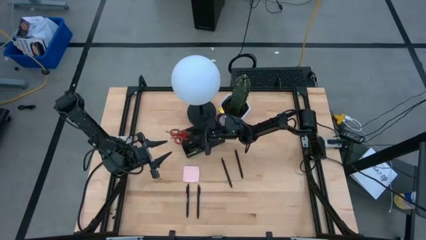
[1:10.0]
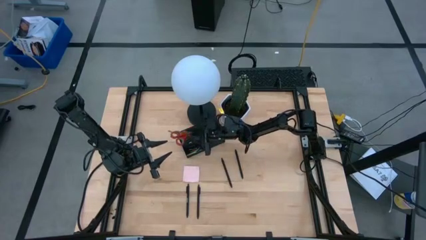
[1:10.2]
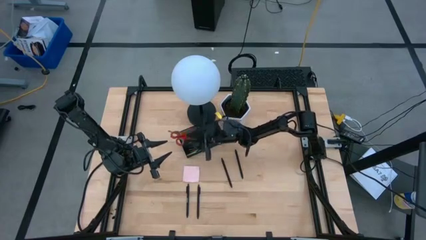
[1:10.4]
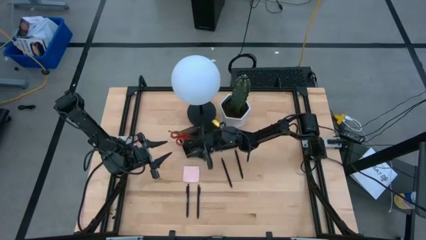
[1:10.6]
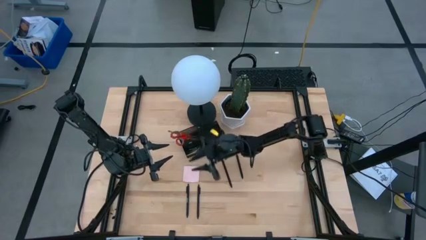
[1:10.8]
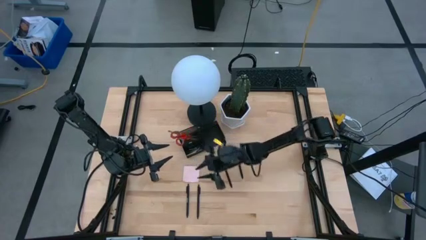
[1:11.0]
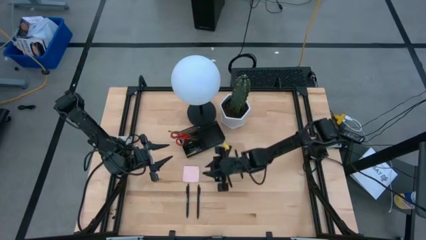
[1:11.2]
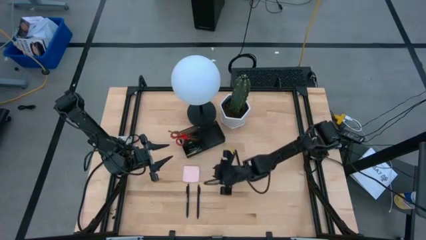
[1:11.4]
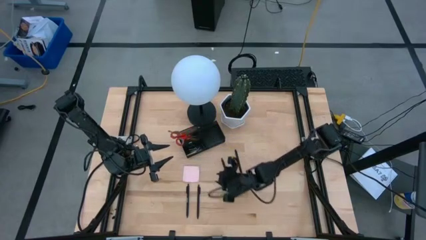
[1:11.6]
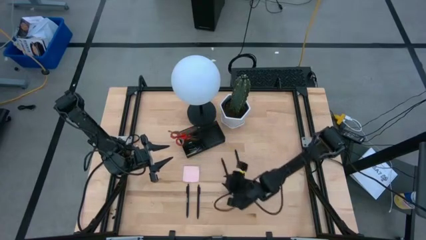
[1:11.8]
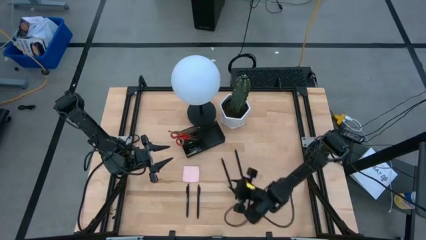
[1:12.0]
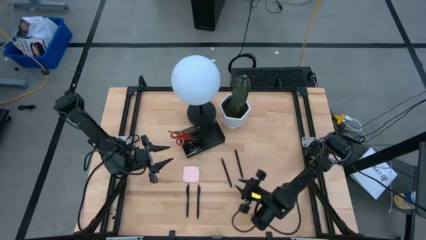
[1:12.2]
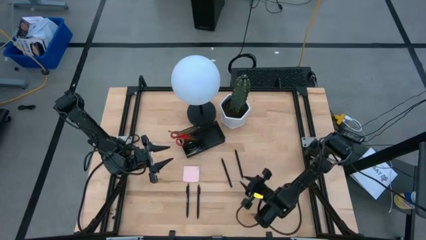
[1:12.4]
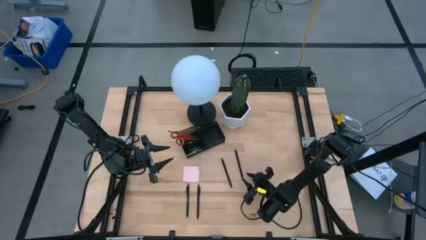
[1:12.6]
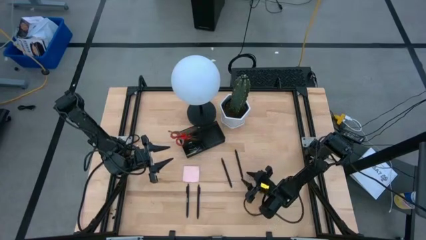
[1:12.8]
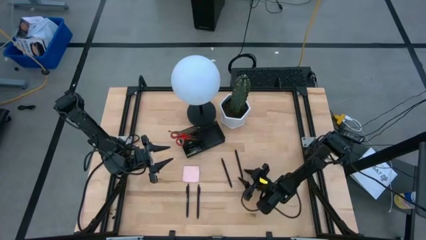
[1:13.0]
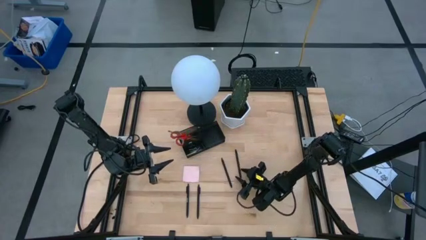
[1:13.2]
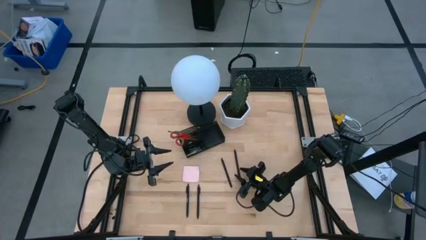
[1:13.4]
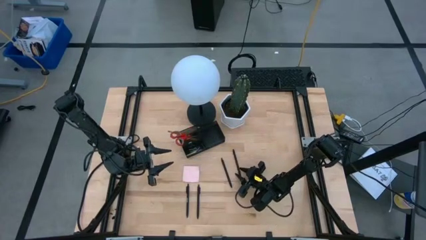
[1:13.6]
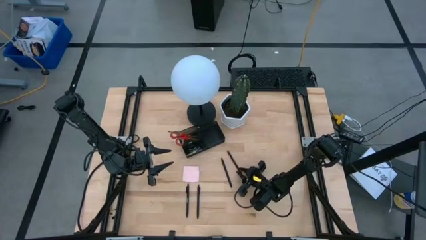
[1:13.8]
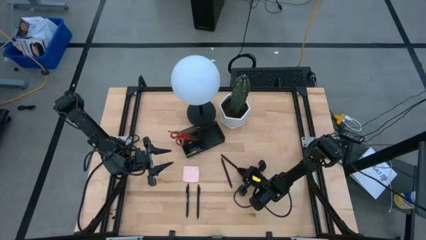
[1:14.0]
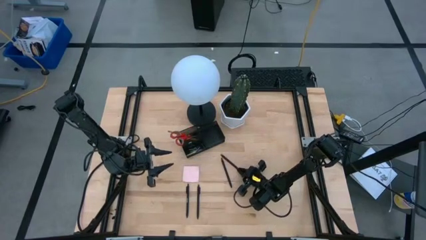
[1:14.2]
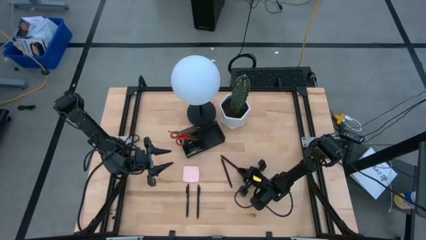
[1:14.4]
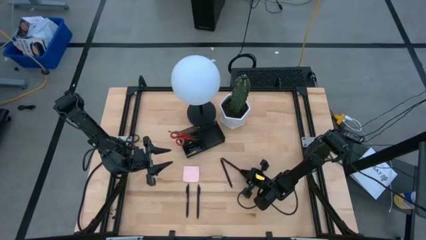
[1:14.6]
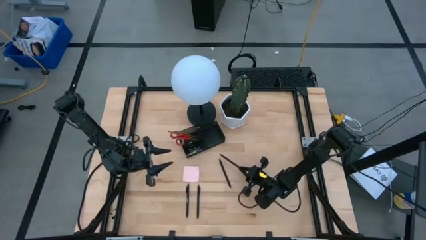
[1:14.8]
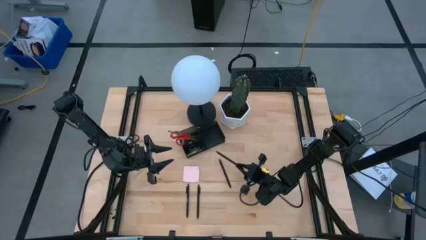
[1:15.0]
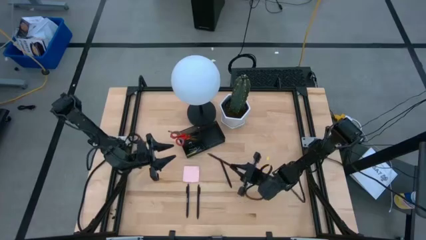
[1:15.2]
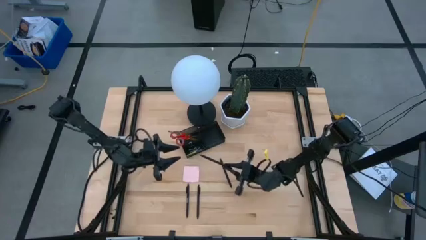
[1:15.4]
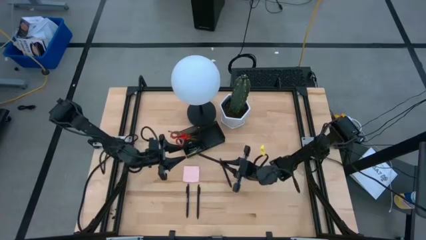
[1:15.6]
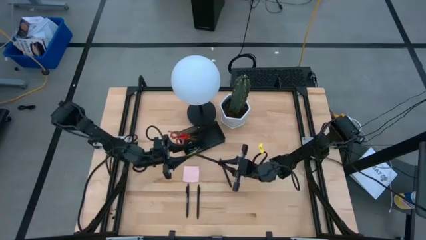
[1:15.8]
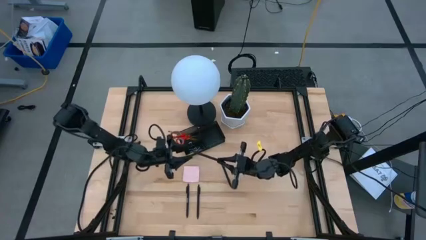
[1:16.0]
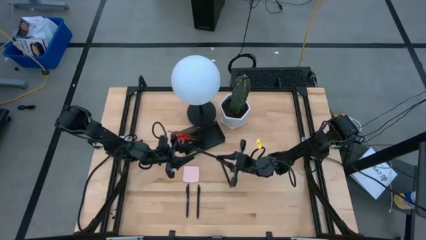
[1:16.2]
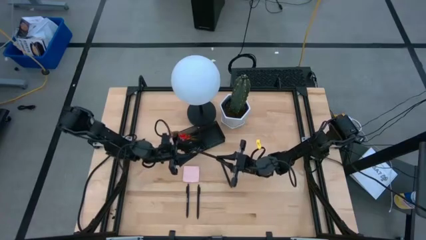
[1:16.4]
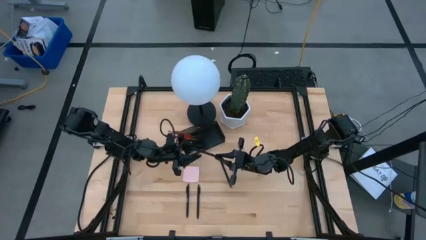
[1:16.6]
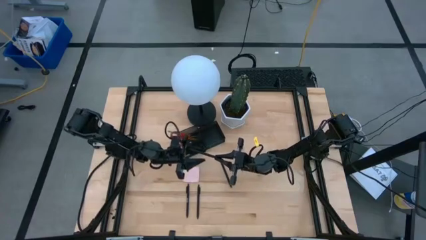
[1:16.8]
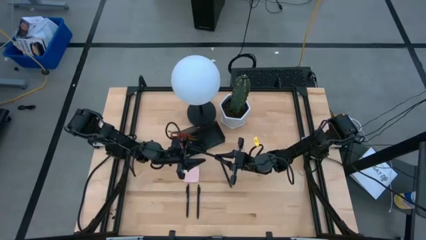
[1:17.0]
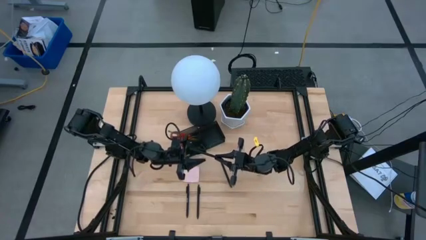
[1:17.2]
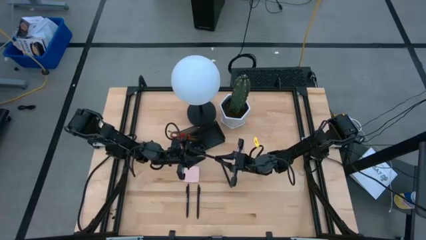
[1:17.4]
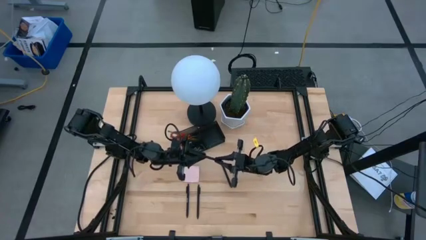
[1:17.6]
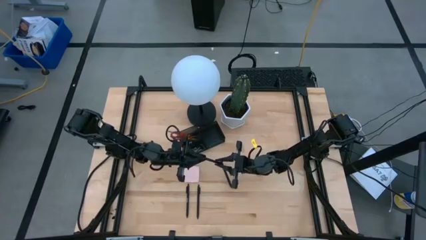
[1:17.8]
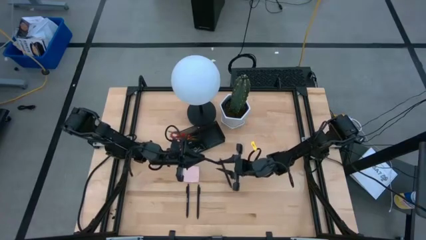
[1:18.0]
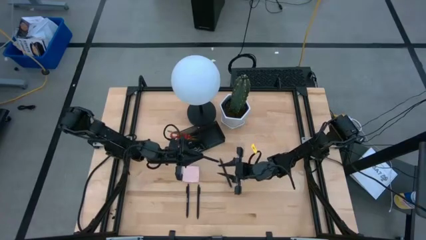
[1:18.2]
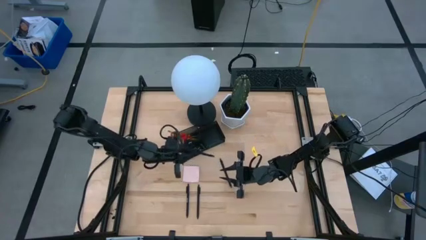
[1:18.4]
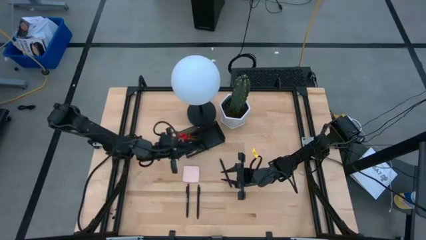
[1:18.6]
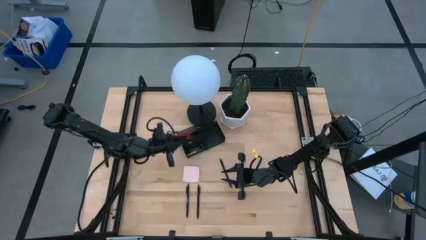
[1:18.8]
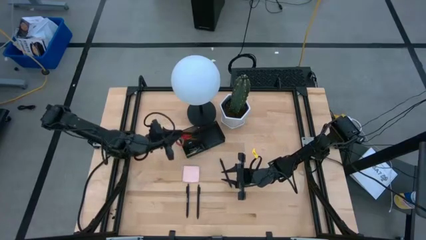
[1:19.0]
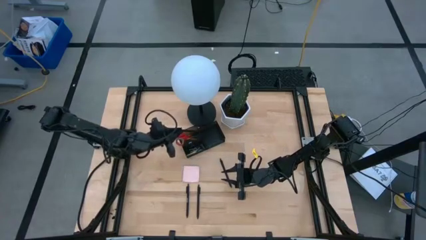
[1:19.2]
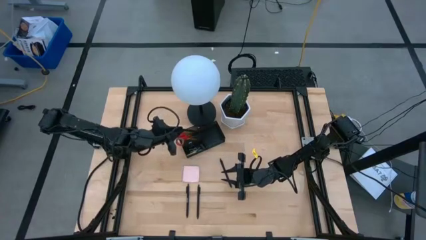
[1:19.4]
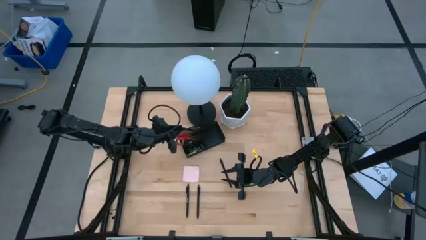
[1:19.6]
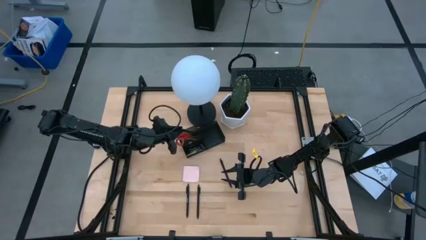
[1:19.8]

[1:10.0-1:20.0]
Task: Pick and place office supplies into organizer
Put the black pen into the desk organizer

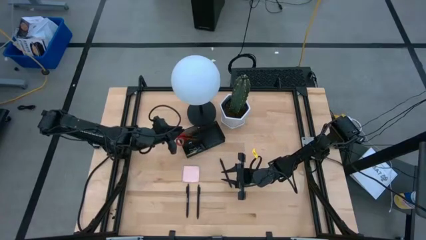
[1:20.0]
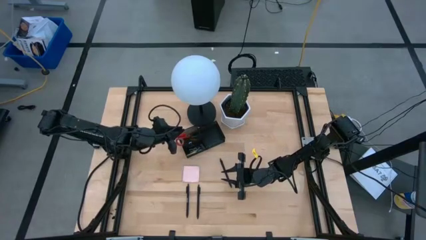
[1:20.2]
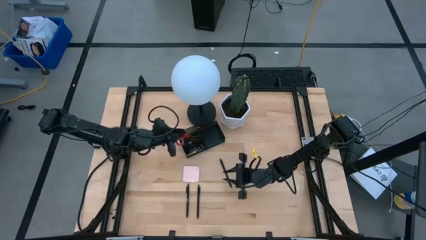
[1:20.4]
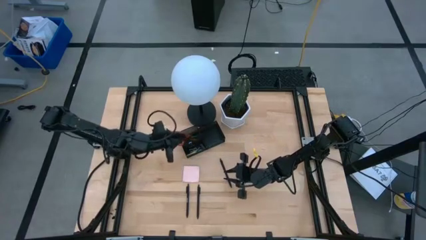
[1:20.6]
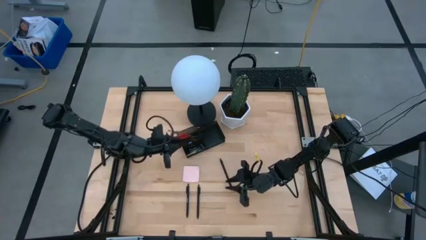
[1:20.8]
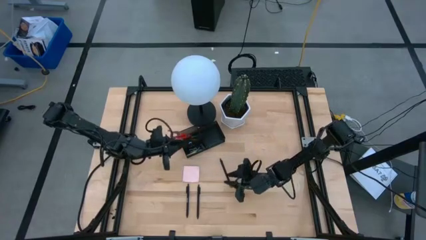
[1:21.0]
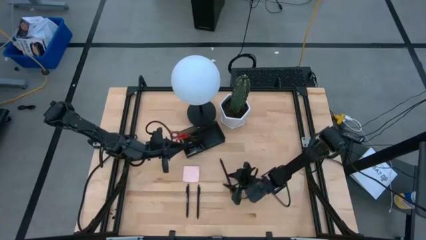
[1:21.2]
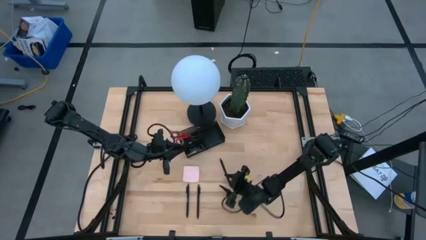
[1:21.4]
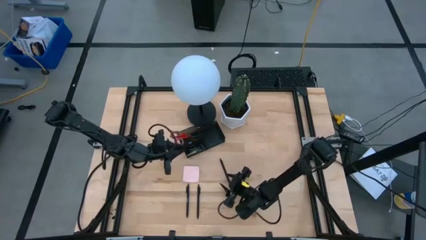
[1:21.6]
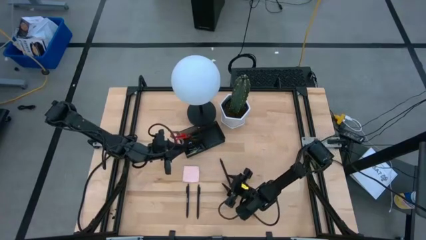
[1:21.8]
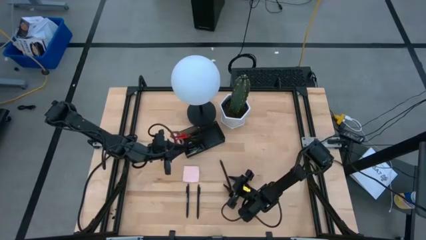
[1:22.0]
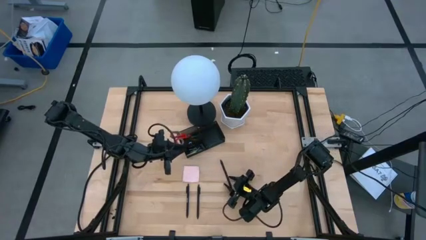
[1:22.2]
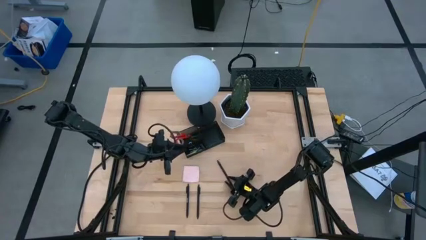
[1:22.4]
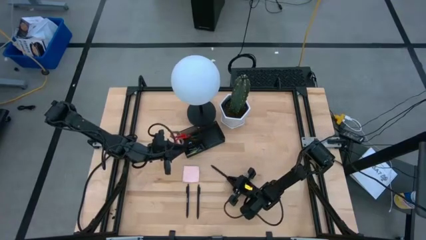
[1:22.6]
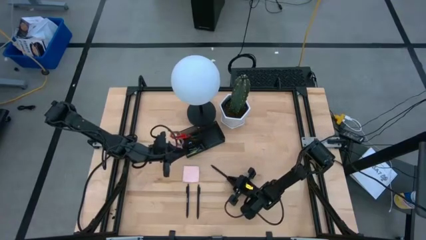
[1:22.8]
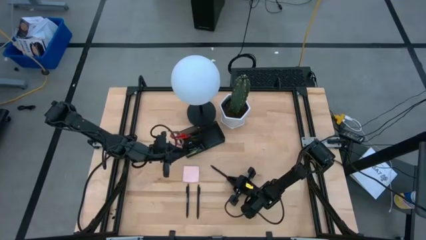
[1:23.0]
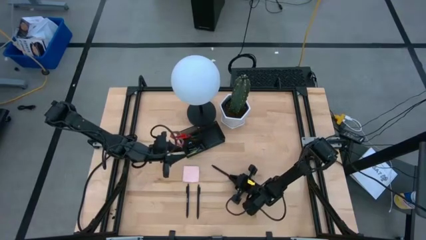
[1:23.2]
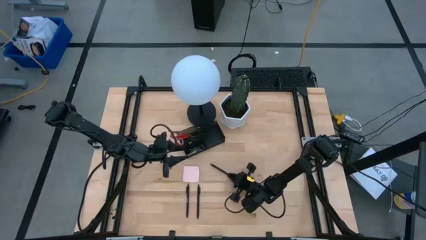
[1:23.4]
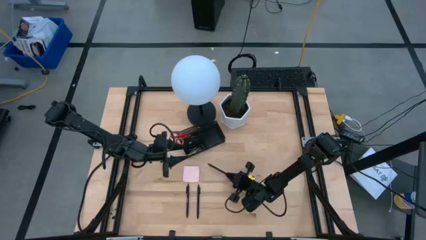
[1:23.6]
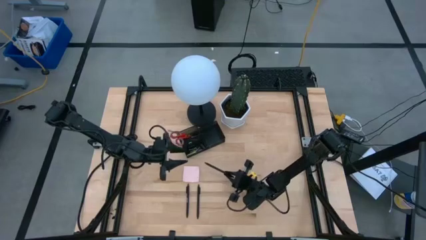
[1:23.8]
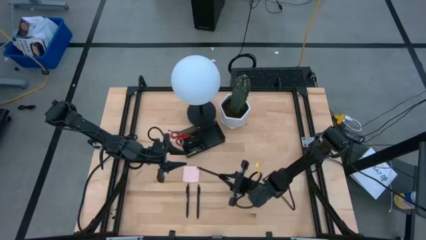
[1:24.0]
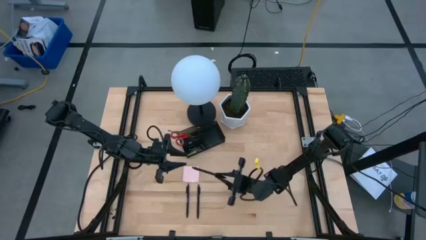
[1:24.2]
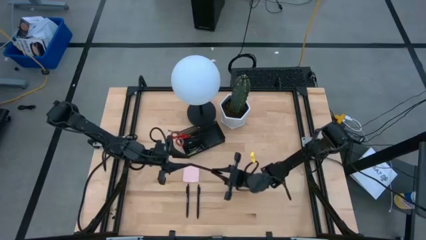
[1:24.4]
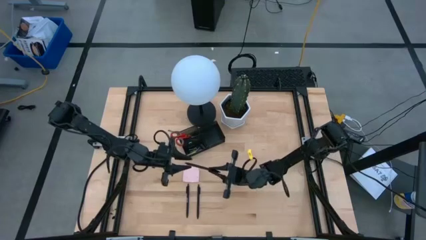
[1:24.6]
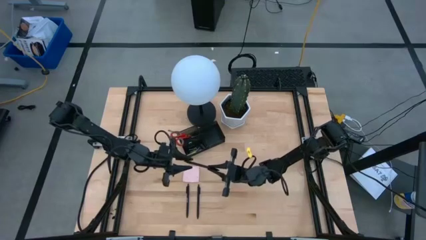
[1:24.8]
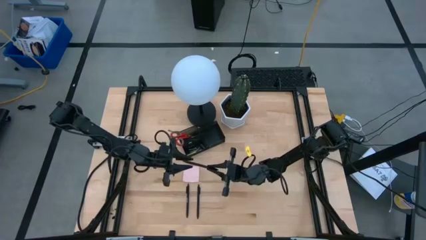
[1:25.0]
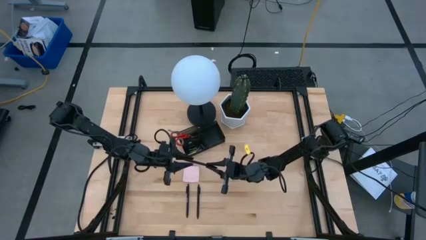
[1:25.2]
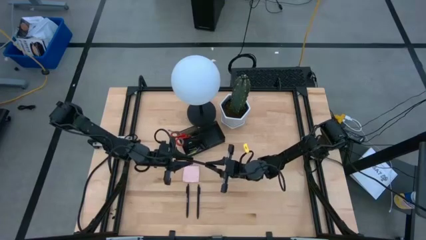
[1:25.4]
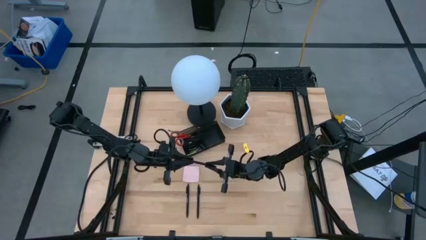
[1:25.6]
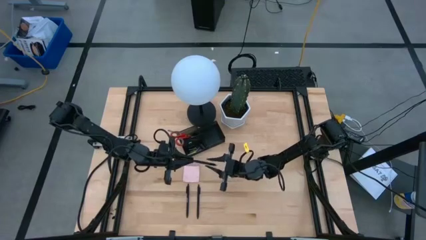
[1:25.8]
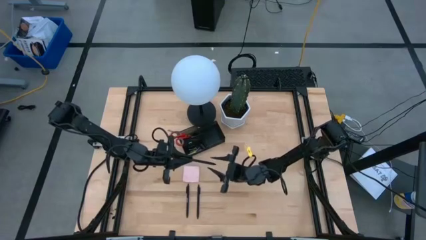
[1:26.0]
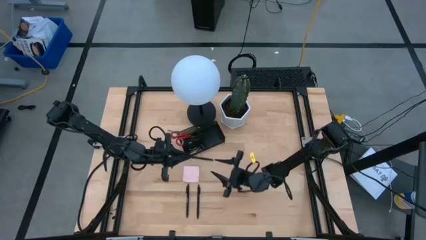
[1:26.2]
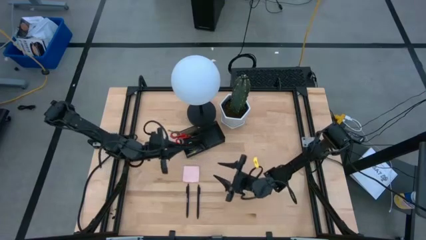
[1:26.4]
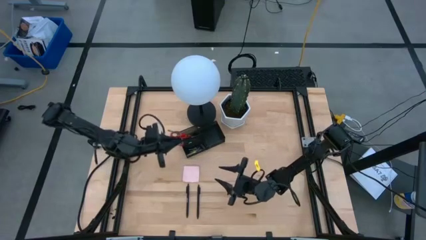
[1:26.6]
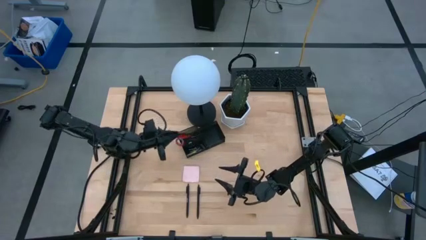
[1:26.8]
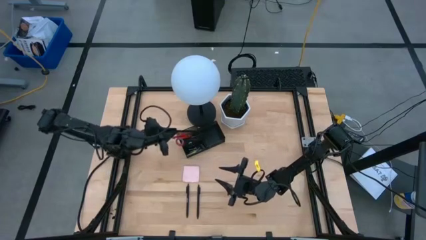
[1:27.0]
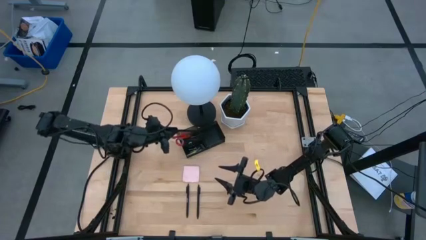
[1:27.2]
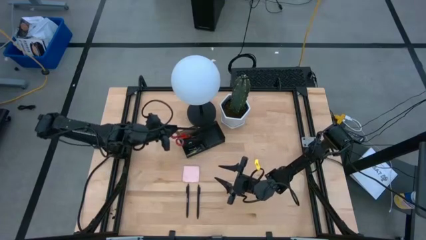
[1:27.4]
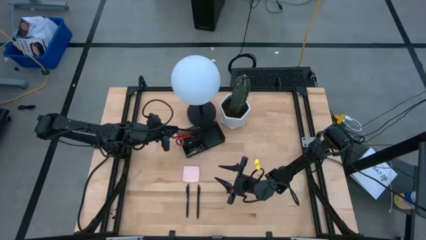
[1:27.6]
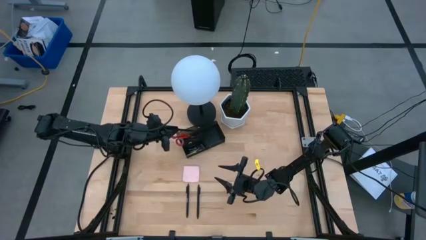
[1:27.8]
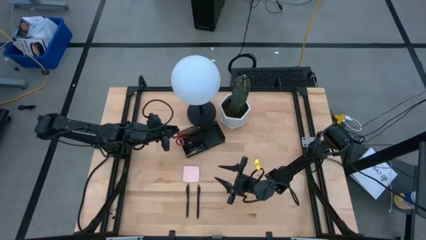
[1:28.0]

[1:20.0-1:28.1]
Put the top right black pen into the desk organizer
